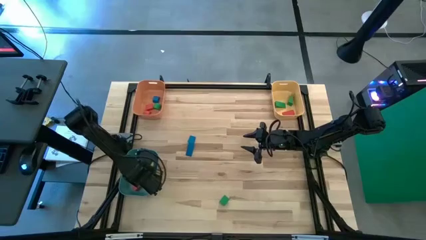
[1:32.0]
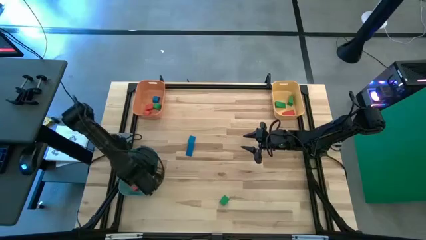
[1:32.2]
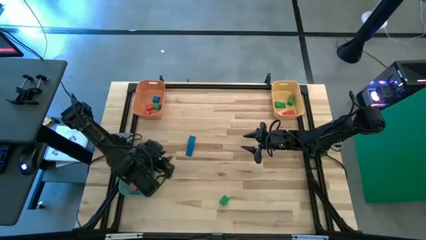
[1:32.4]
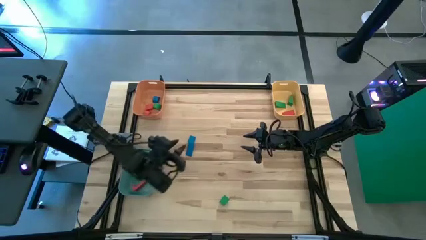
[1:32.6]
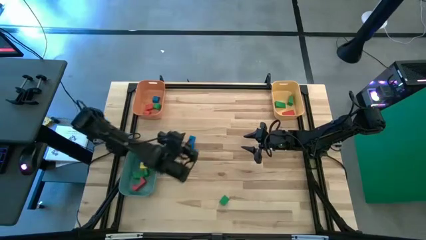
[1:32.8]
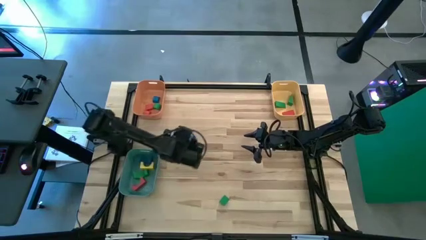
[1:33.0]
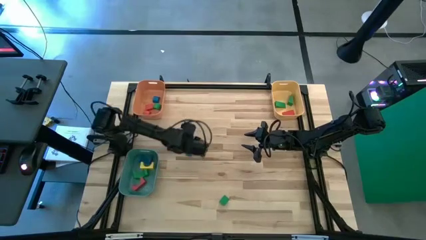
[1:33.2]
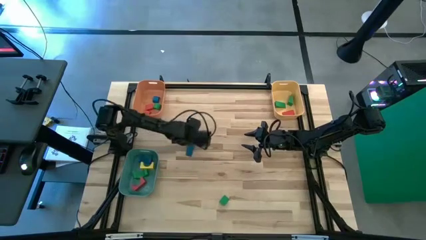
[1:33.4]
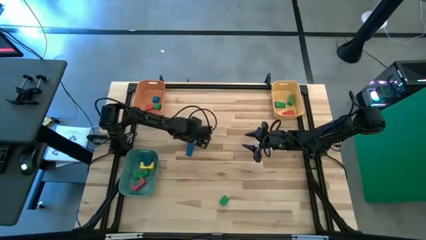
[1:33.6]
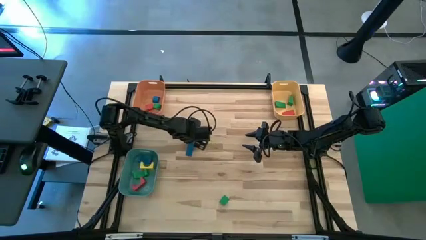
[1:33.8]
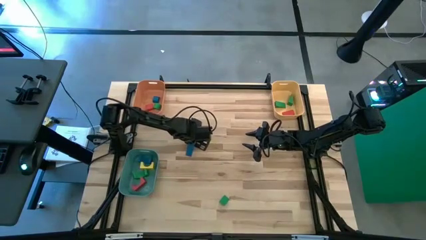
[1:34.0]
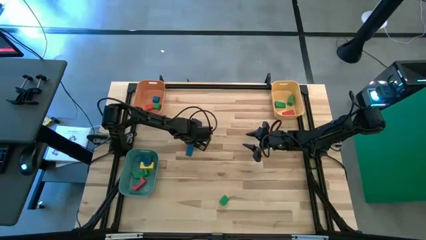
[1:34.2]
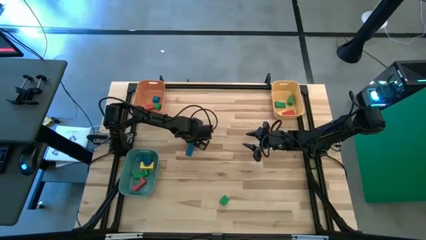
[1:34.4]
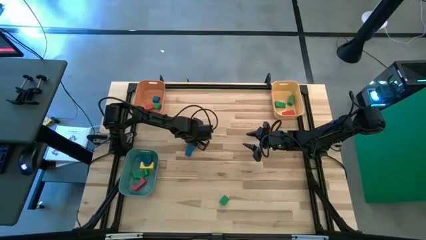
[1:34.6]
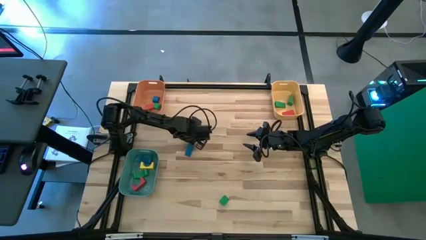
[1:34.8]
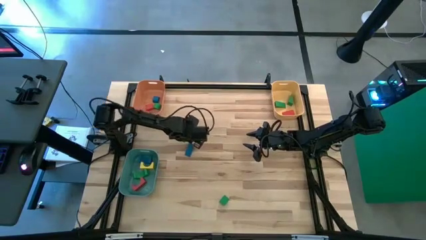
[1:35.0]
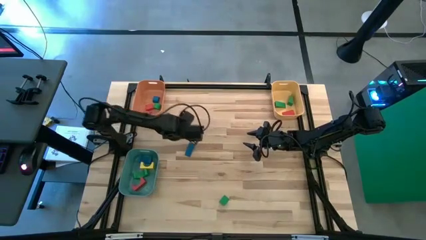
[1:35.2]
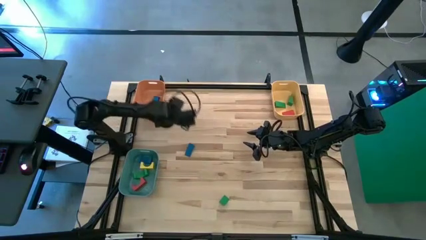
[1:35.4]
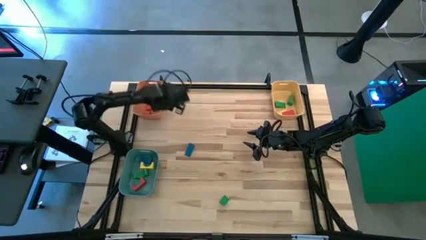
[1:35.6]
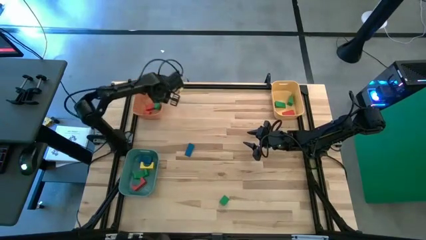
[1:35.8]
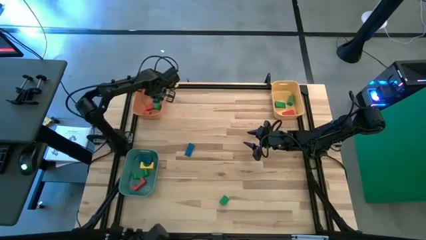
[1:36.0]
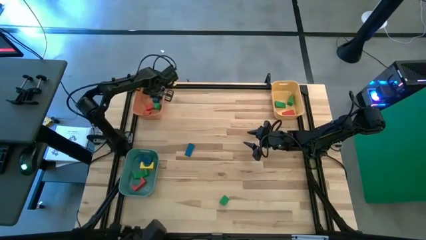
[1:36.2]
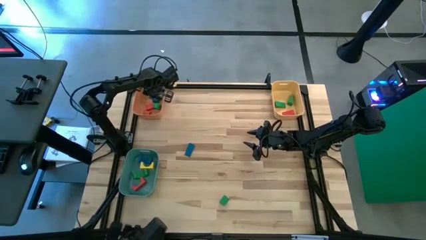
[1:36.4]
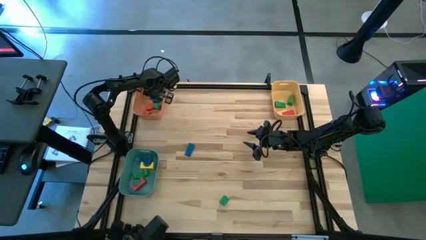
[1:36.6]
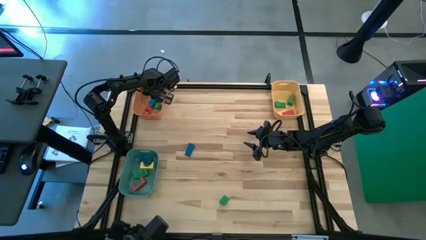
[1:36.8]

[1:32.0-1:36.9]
Task: Sort blocks by size
Put the blue half circle block into the orange bin

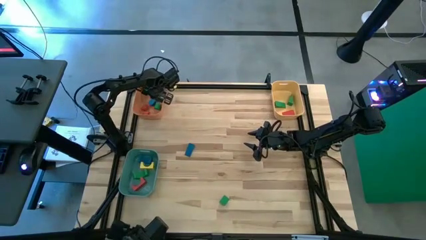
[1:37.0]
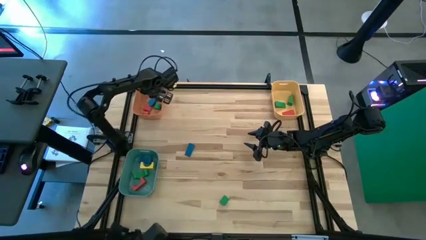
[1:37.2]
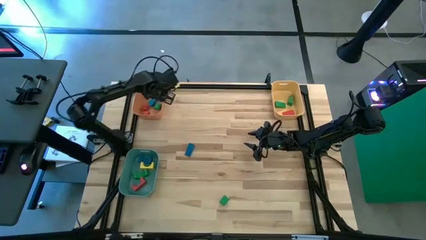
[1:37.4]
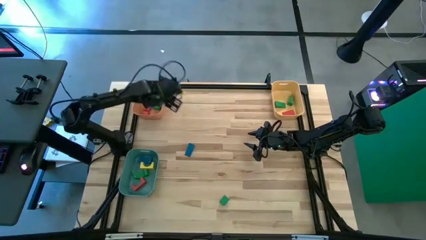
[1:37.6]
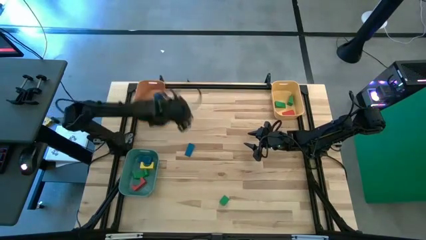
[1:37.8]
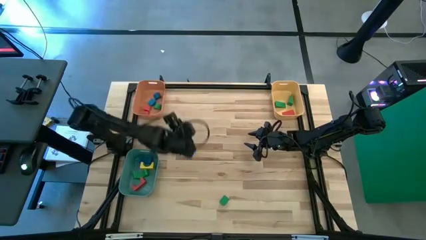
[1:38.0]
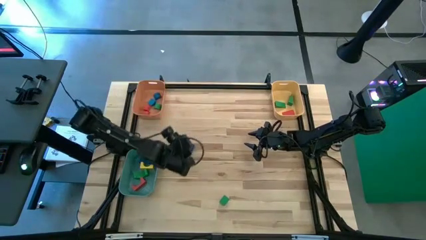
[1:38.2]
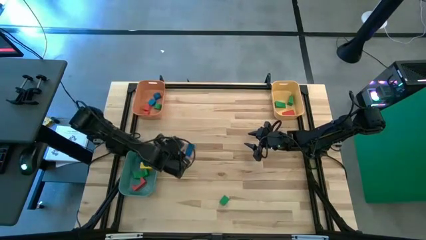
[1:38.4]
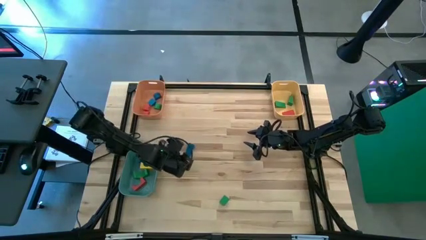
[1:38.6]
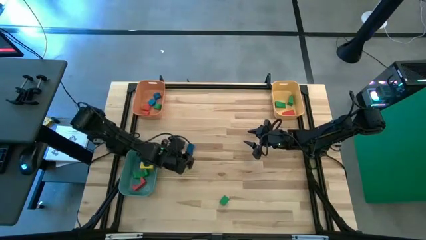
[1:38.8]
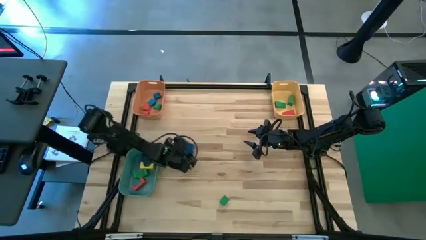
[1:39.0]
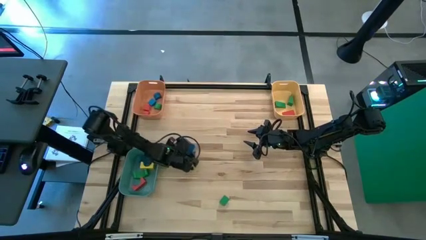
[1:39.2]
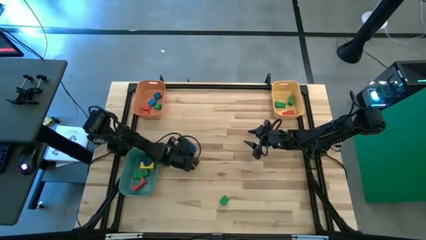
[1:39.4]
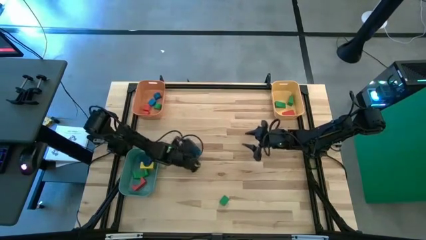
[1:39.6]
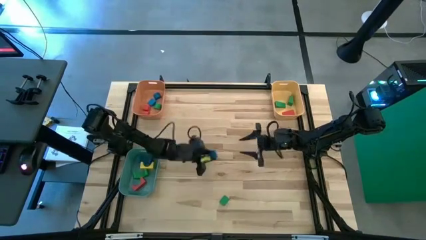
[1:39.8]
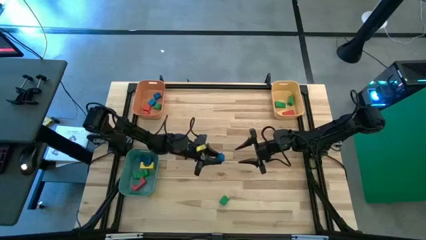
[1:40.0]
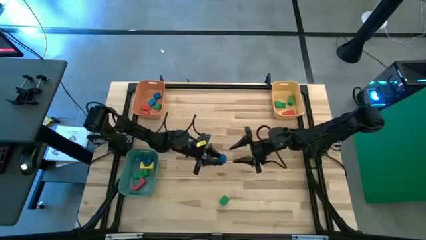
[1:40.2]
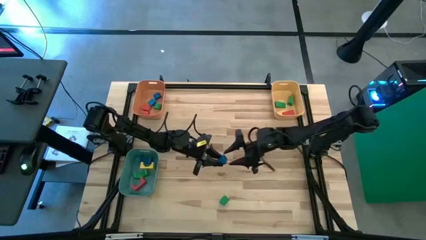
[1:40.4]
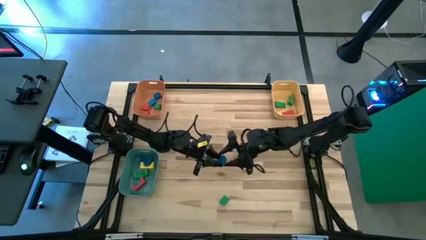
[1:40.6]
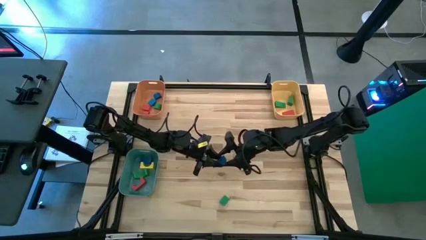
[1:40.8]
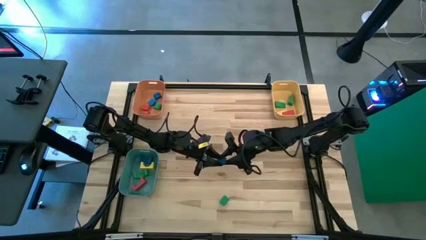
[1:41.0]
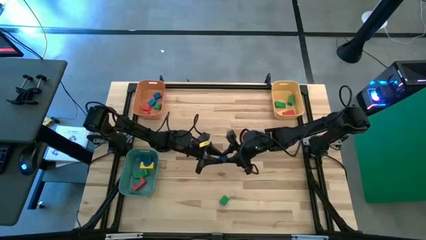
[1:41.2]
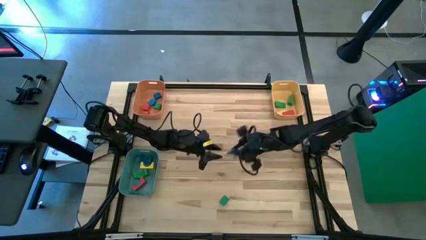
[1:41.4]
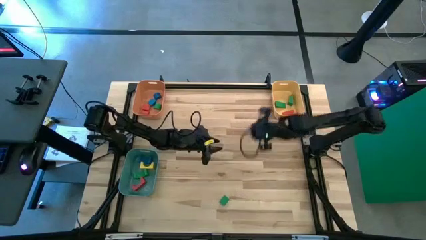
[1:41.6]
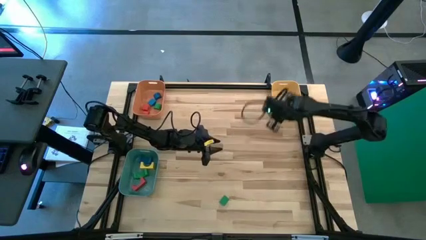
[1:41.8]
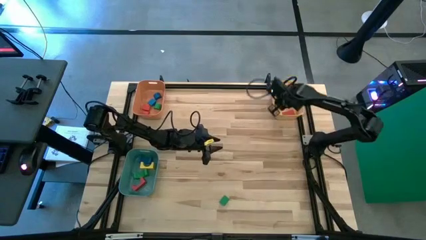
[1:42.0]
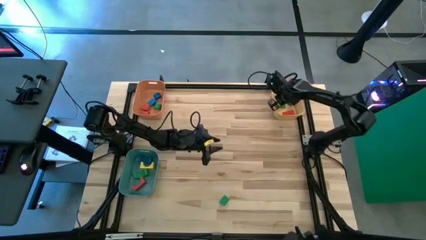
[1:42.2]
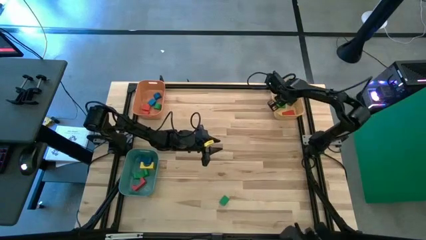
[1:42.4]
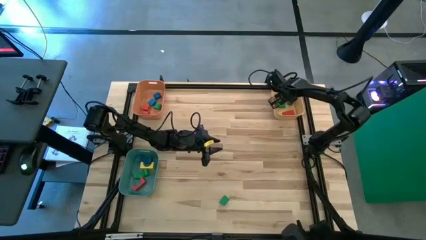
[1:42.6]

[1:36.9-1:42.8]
Put the blue triangular block into the yellow bin

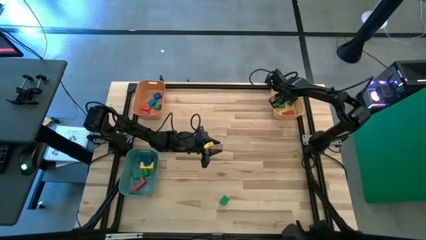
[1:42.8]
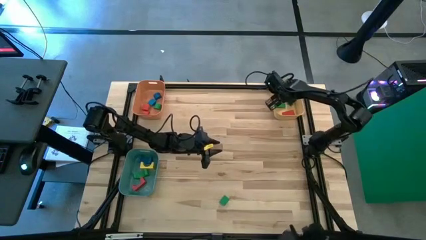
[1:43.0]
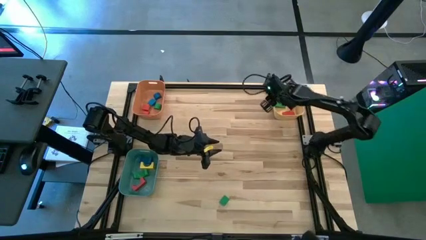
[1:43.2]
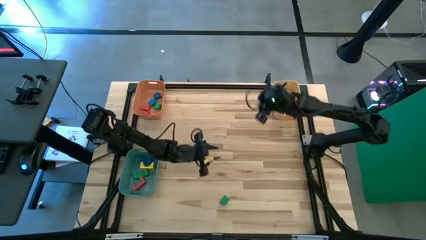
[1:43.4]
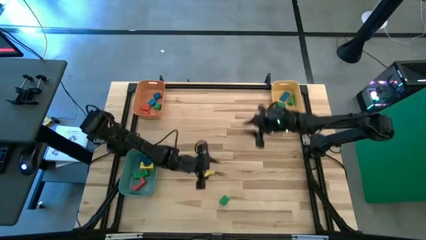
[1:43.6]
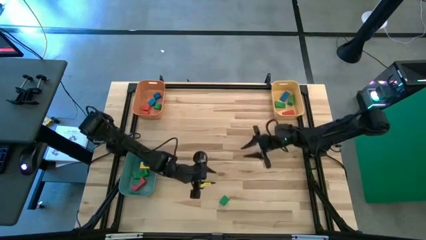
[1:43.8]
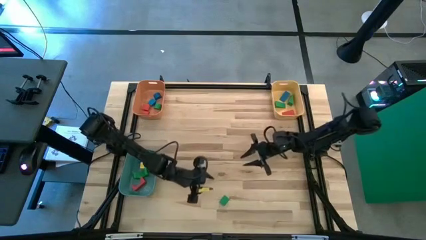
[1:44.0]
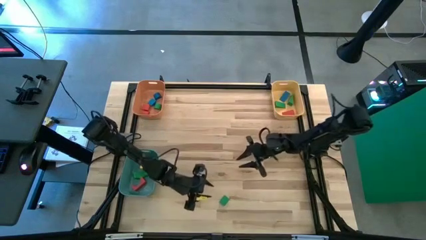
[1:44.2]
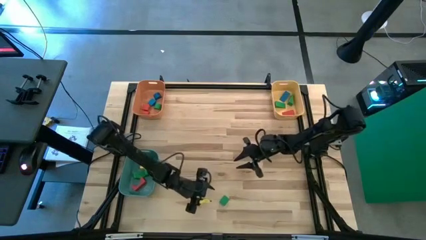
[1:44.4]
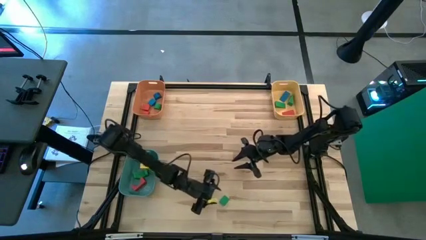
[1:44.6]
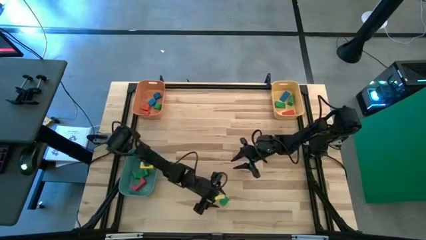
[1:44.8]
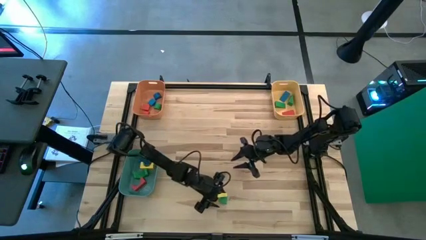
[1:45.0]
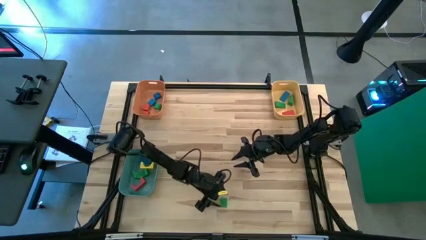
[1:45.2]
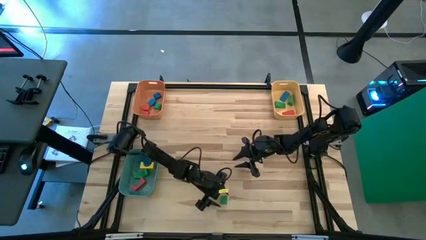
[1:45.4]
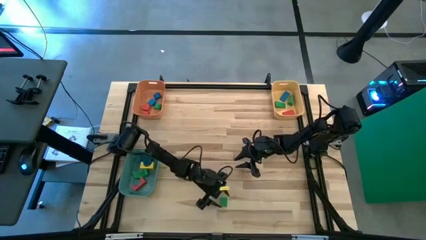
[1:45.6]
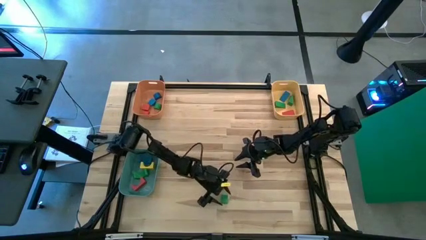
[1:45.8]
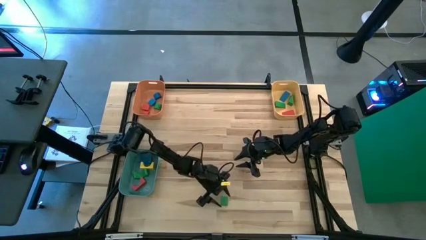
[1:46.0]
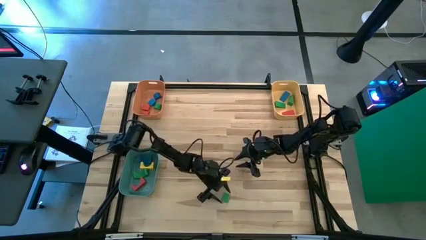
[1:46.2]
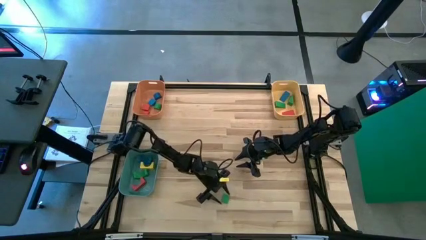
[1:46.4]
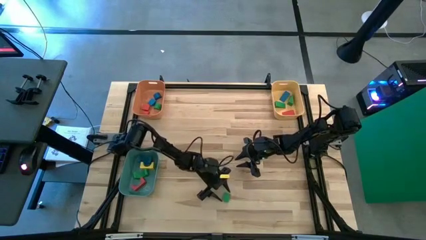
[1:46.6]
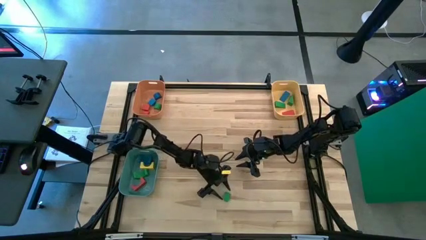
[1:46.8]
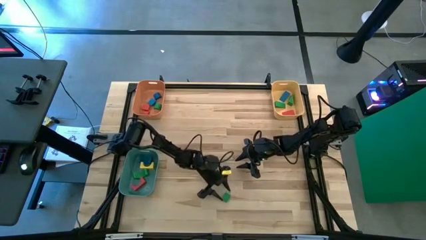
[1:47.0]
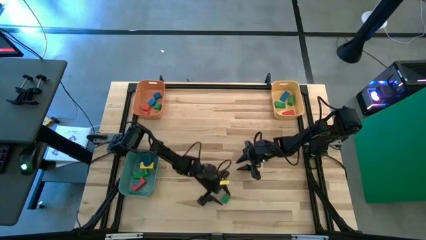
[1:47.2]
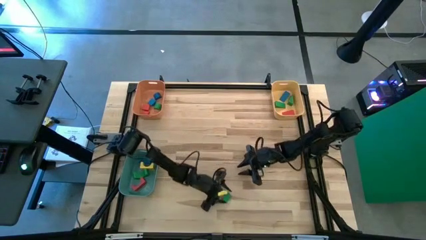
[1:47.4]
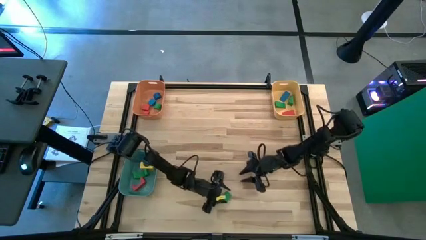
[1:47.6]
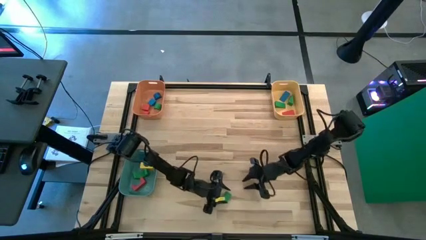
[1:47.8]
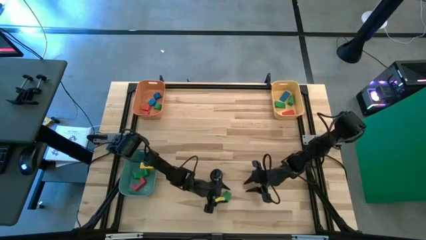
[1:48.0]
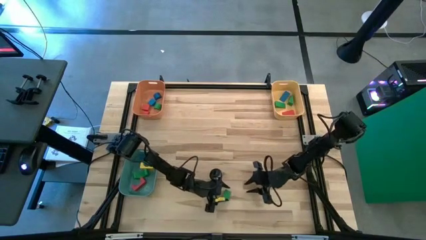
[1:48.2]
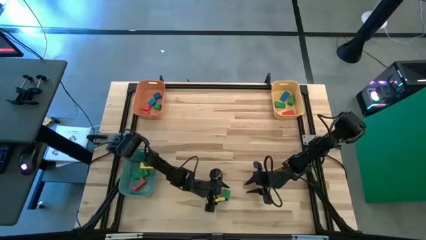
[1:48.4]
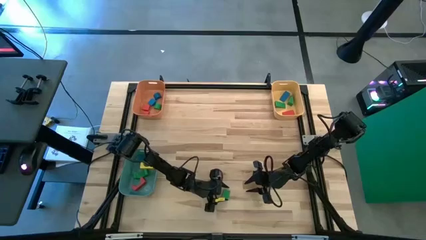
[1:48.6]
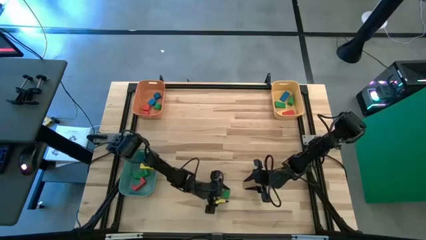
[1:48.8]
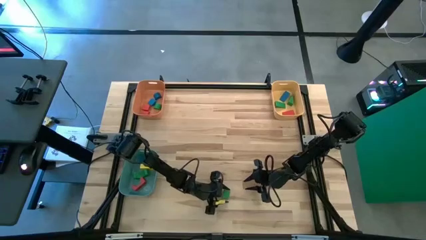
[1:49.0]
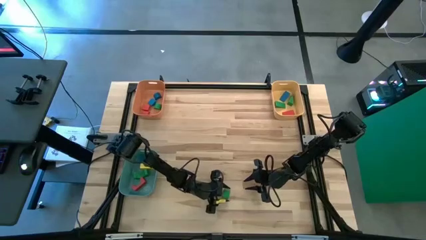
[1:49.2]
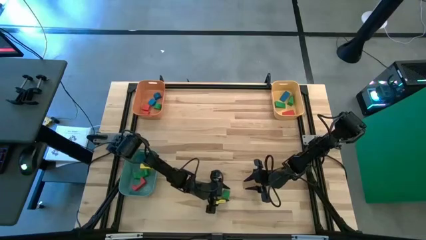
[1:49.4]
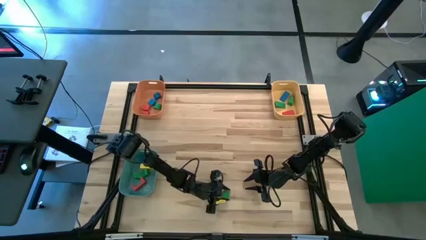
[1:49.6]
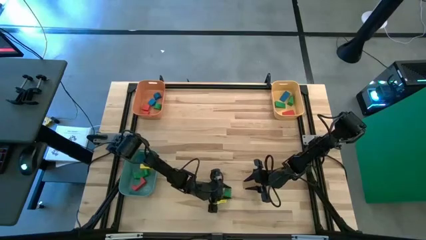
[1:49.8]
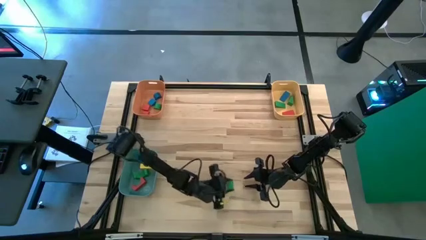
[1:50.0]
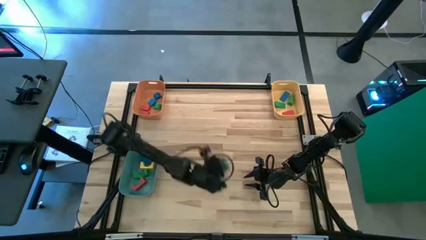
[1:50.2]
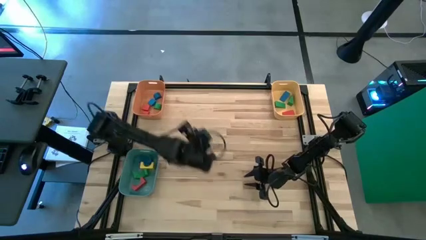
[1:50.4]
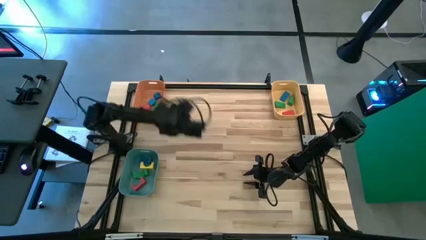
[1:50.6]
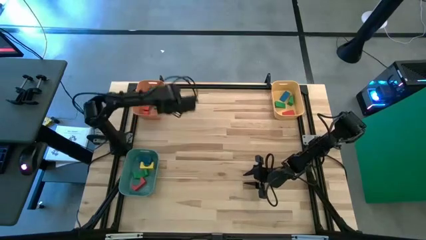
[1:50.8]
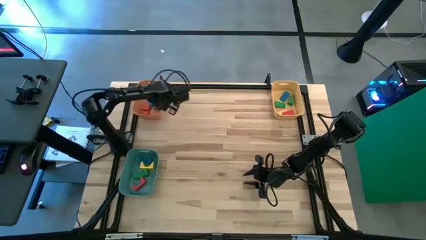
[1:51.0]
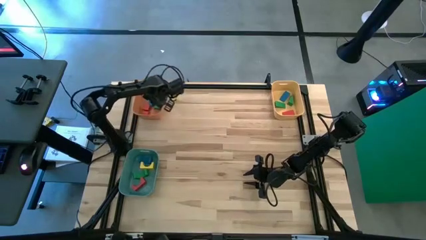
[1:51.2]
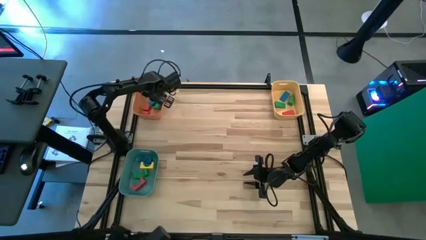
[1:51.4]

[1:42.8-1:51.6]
Put the green half circle block into the orange bin
